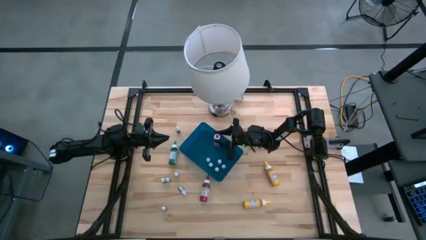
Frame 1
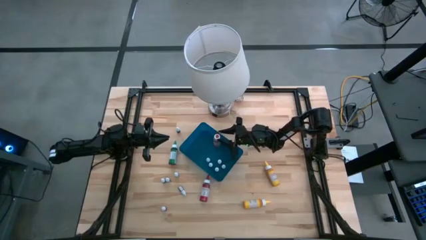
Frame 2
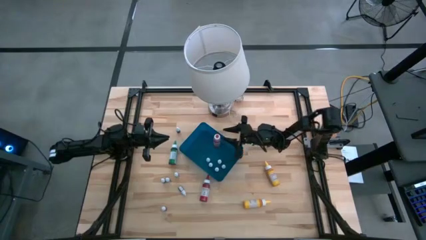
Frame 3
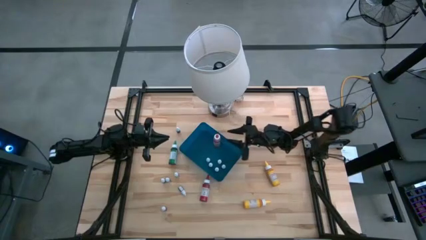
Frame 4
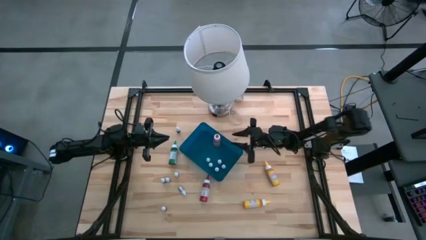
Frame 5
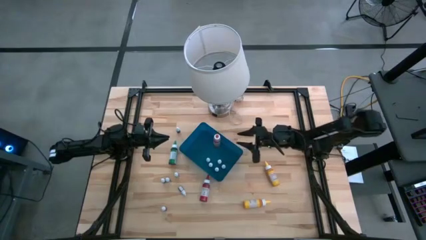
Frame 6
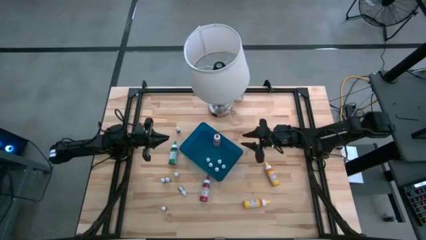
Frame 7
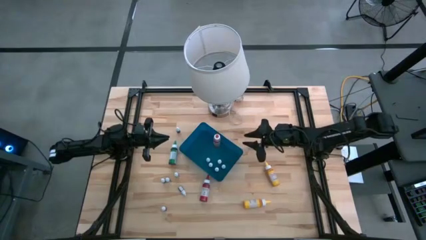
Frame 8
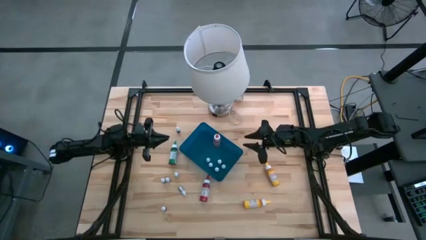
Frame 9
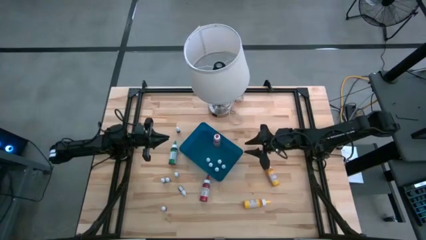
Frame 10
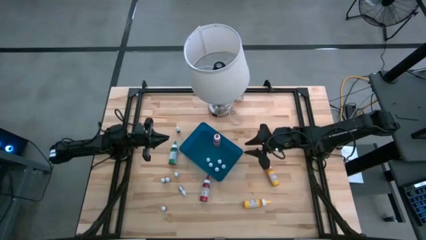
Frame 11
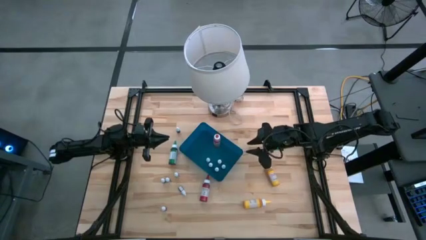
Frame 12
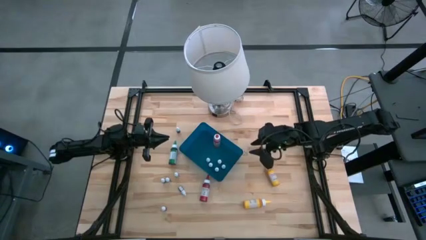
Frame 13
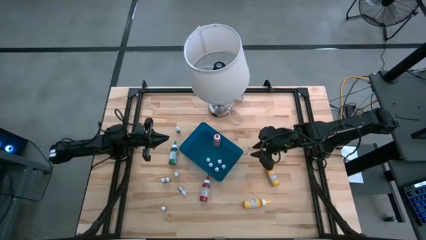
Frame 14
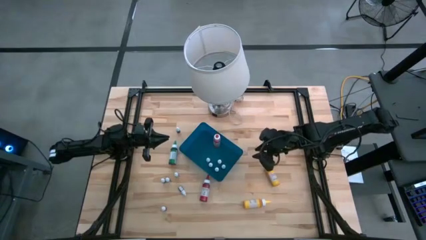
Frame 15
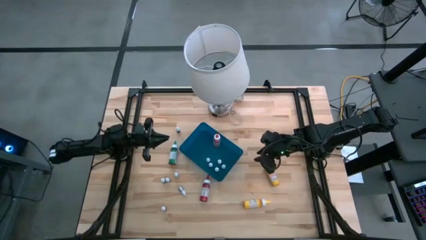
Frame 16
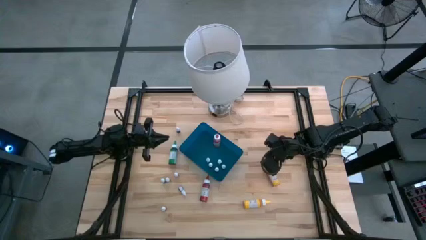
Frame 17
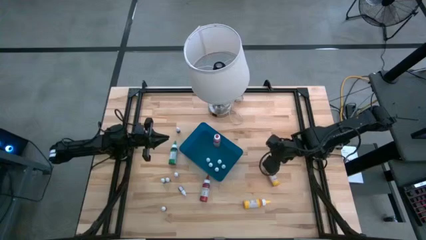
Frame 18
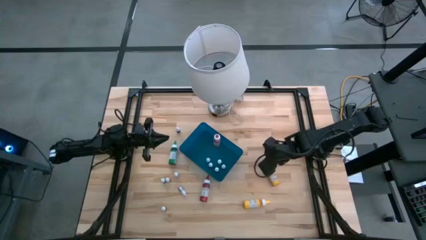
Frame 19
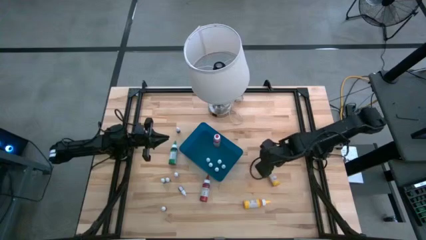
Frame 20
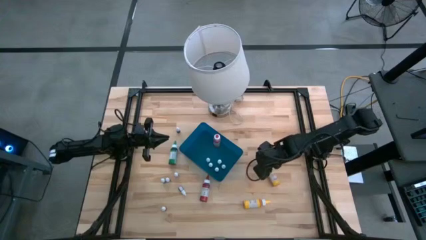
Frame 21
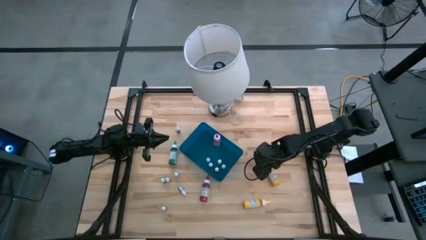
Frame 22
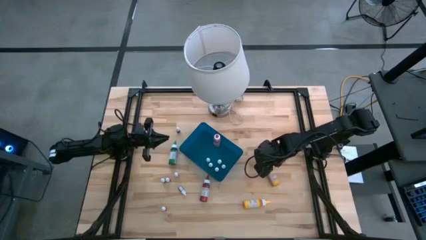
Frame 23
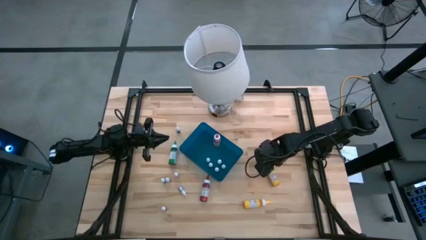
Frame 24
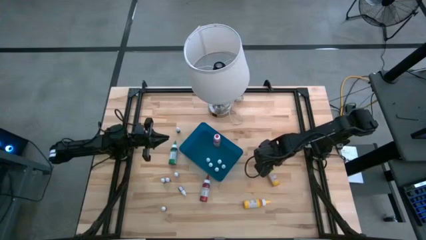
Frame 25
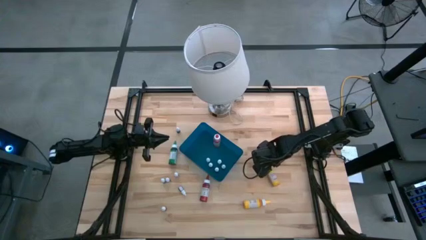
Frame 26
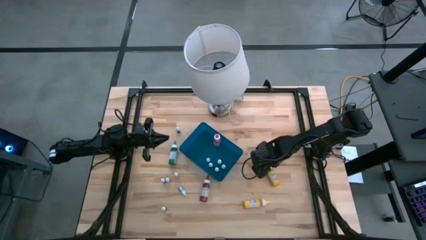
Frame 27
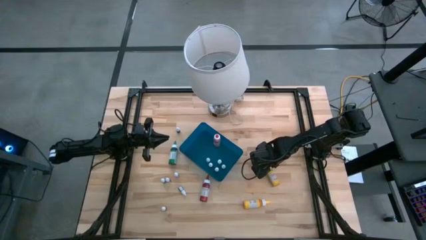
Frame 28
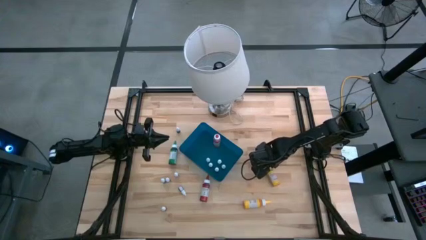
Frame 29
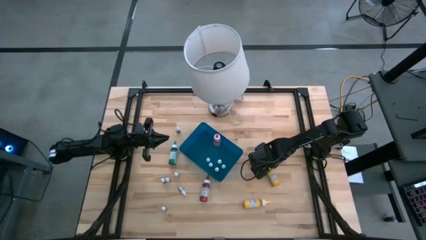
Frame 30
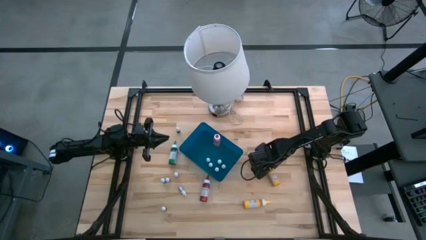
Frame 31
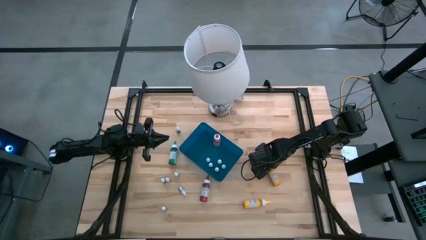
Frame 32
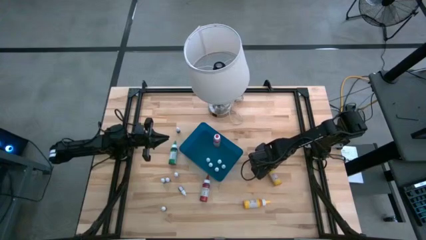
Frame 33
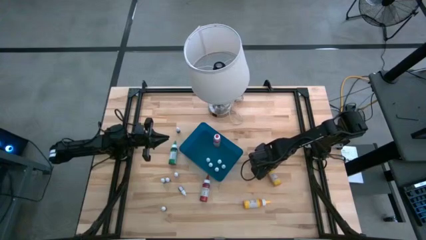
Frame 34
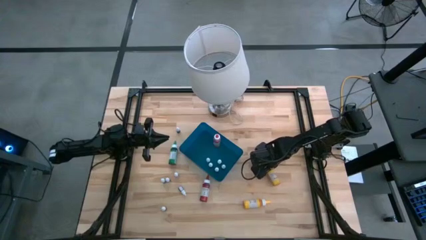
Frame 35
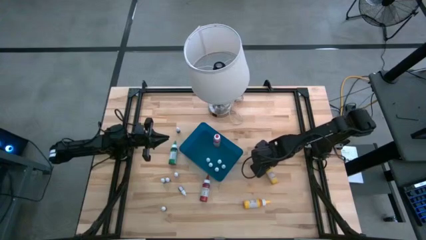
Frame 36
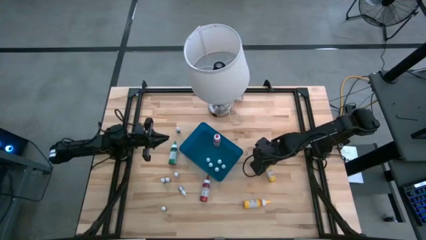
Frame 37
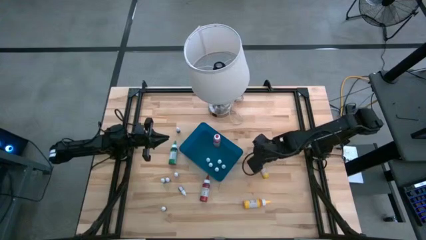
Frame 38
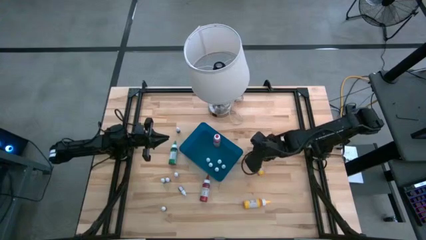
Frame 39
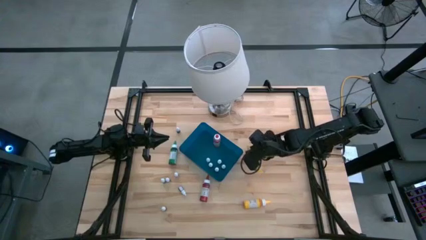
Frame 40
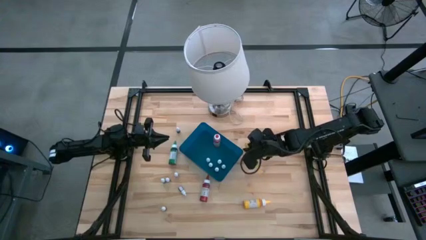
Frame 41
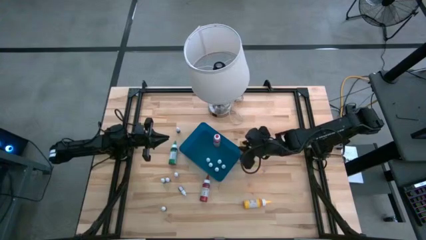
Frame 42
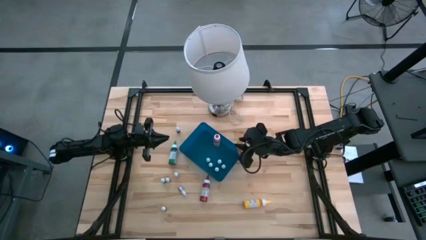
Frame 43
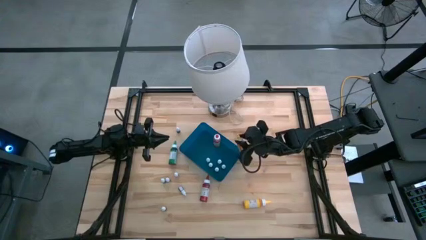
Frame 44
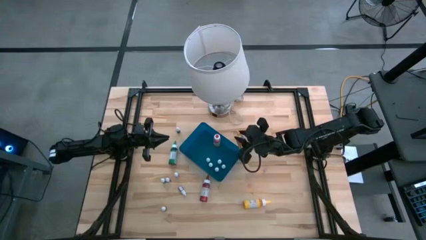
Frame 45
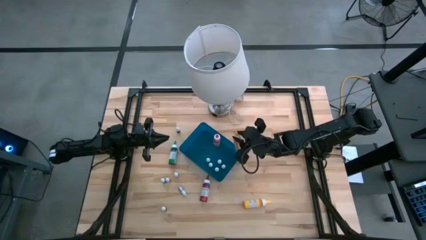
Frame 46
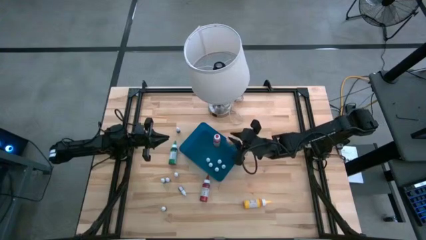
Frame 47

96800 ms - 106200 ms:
Task: Pick & Place food coloring
Put the large yellow food coloring bottle into the blue container
